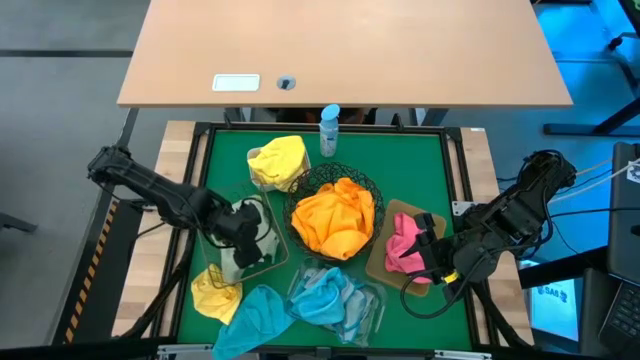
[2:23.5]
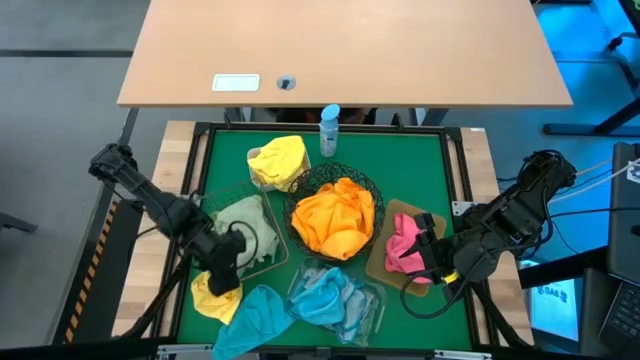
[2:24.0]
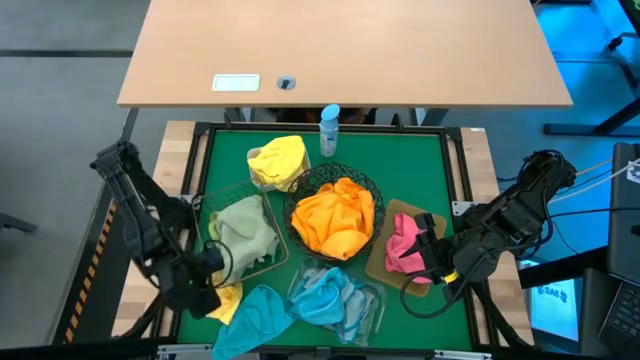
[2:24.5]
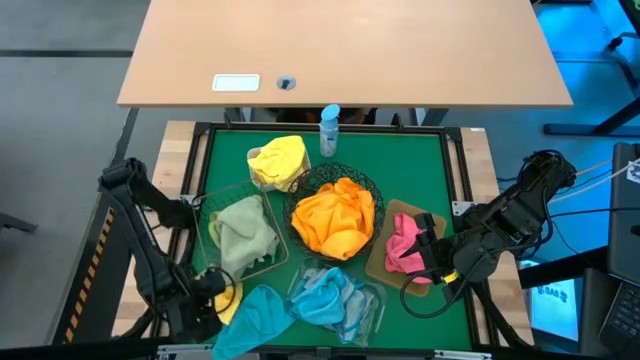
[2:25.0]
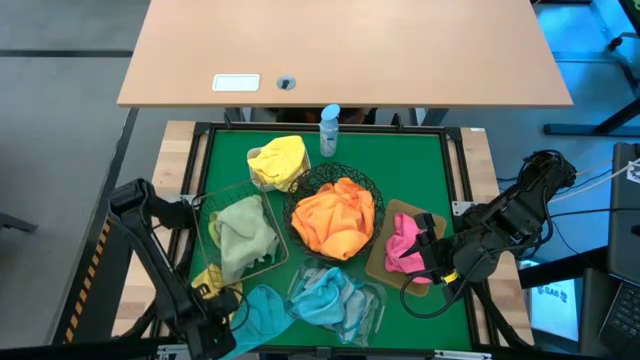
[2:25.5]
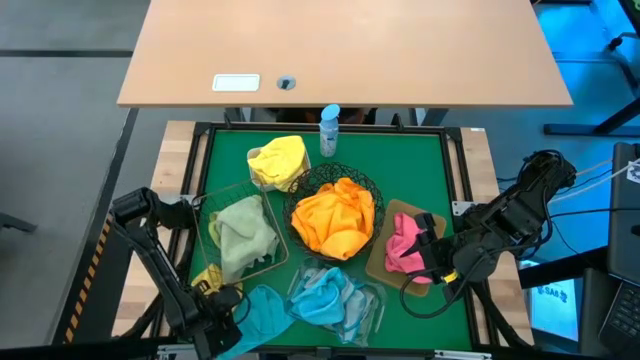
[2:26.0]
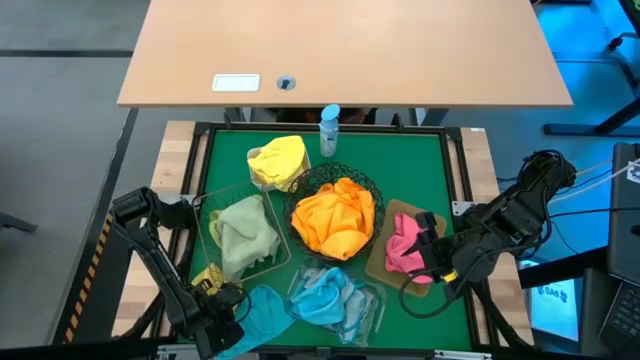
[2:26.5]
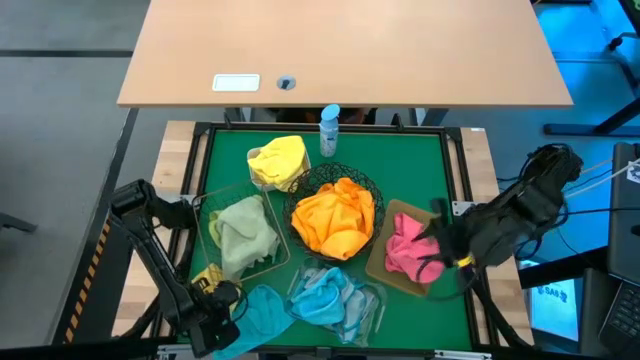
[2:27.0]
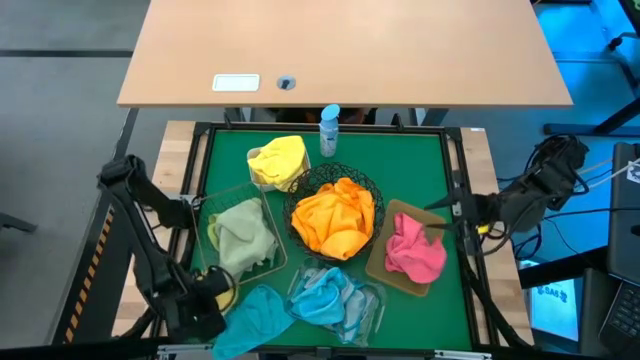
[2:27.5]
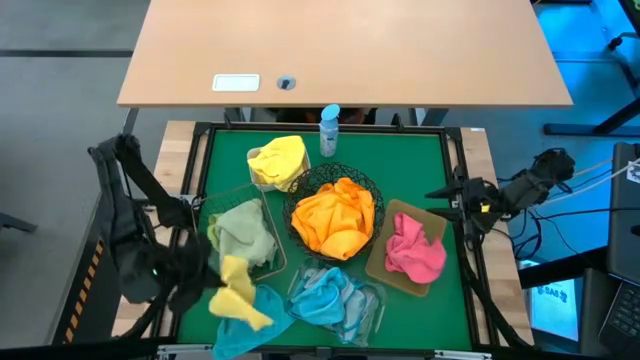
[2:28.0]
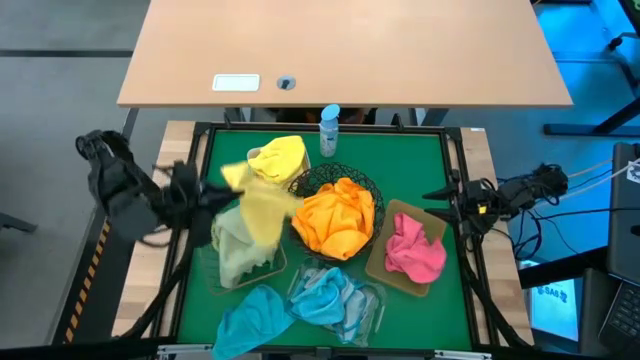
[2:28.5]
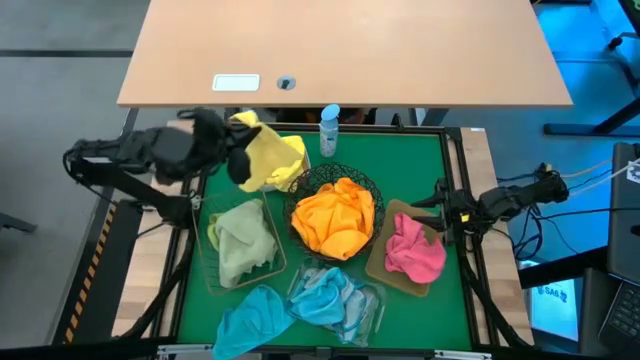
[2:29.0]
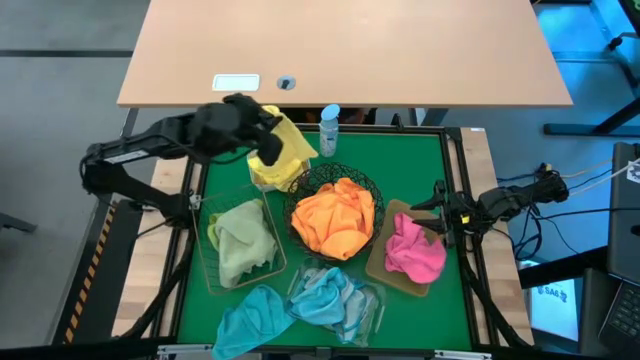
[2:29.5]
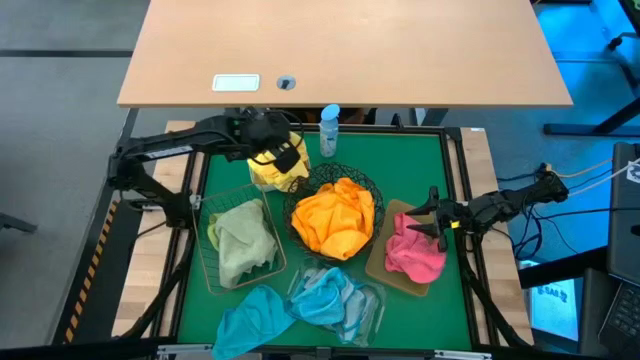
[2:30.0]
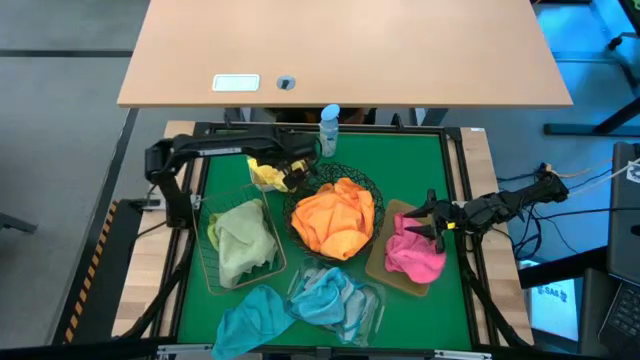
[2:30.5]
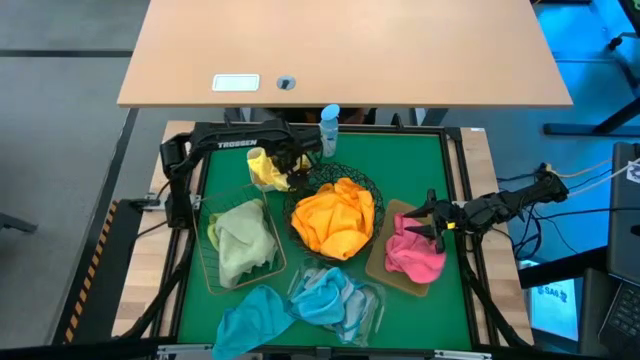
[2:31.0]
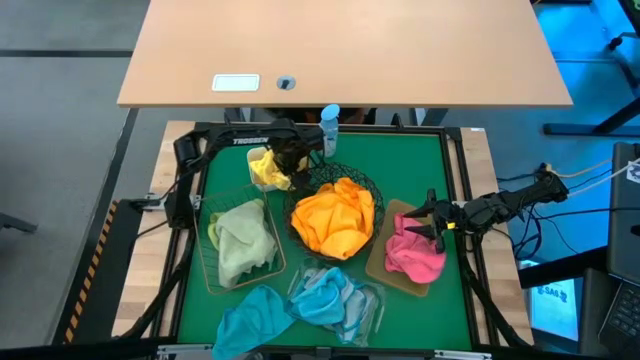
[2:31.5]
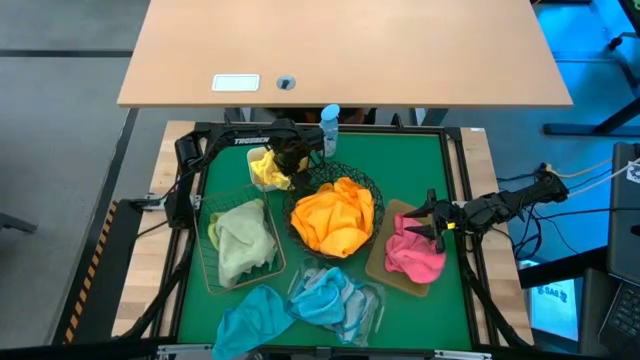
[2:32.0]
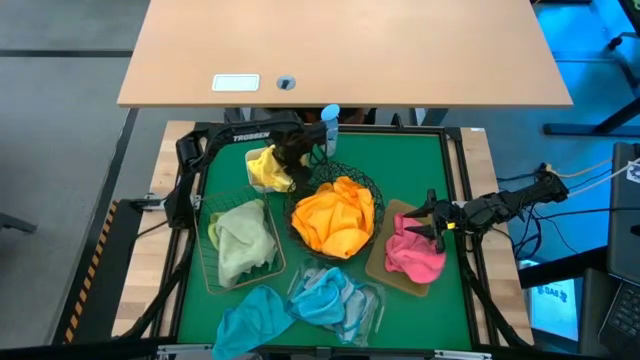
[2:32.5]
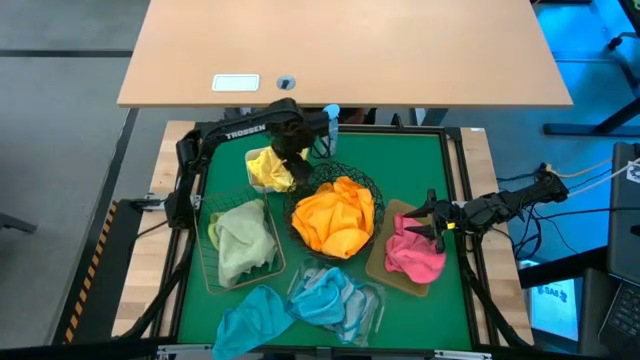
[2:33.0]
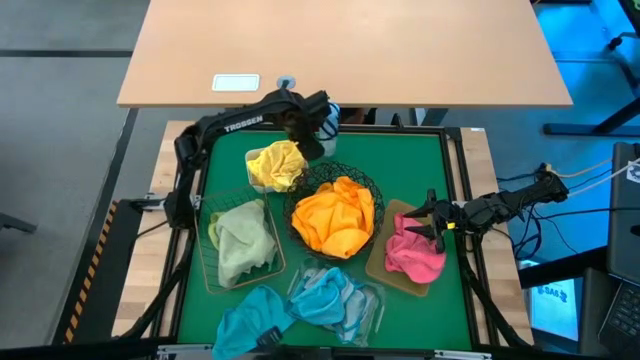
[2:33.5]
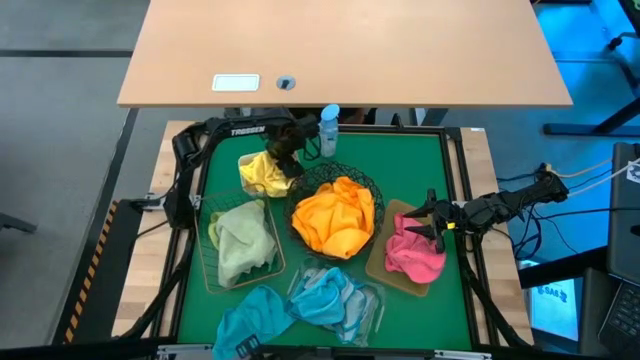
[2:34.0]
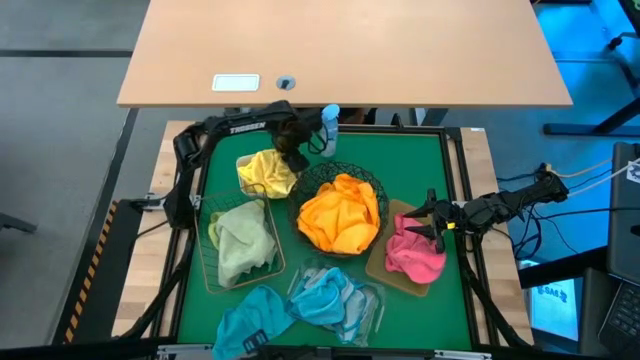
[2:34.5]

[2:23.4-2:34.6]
Task: Sort microfiber towel by color & place in baskets
Put the yellow towel into the white bin

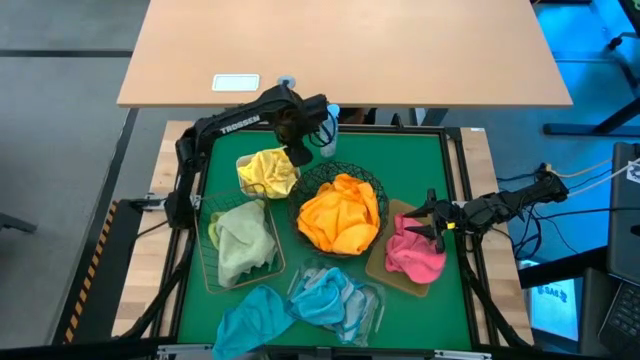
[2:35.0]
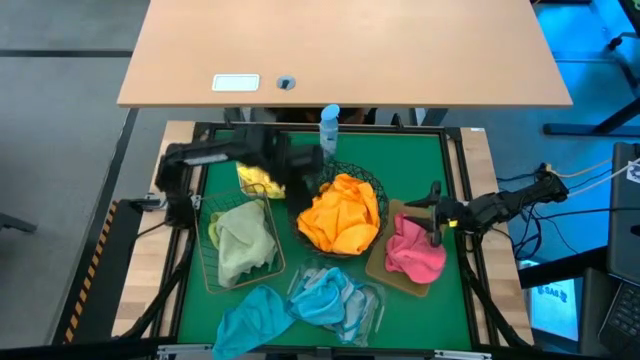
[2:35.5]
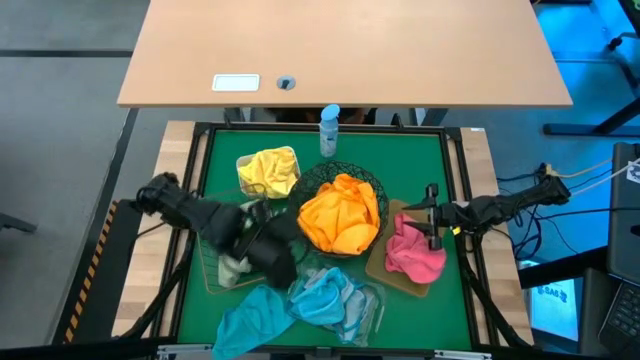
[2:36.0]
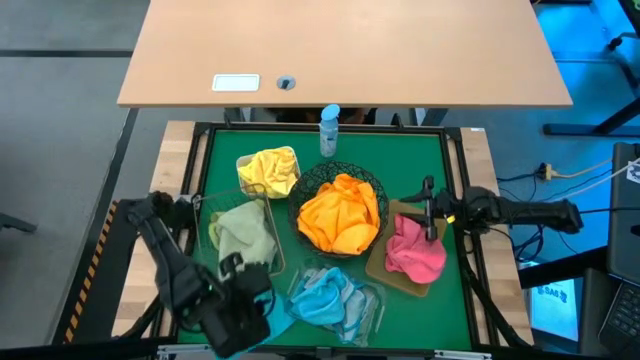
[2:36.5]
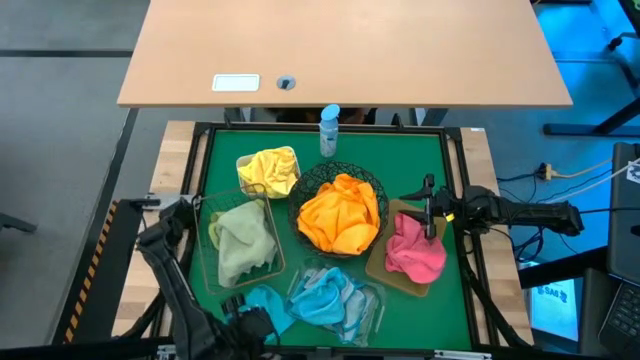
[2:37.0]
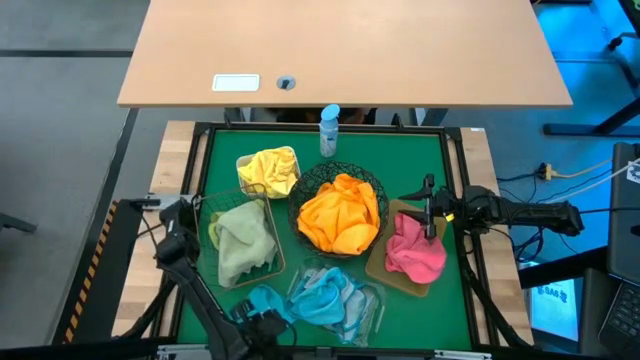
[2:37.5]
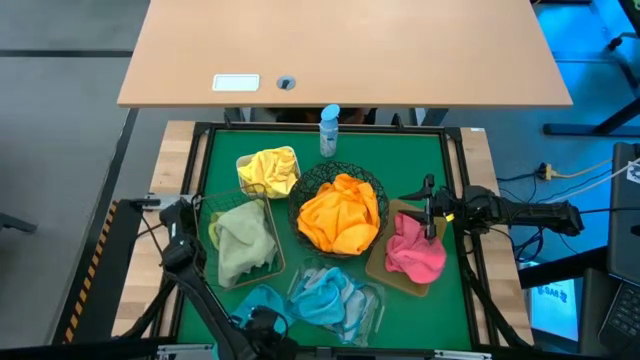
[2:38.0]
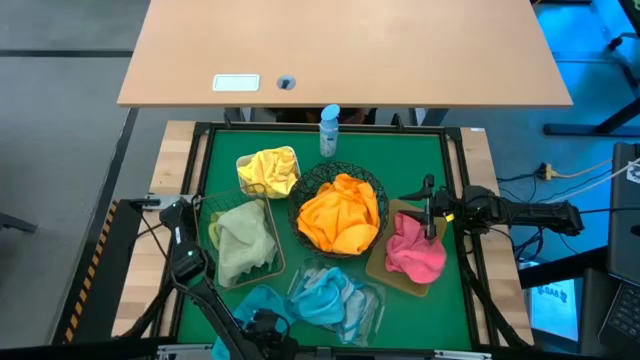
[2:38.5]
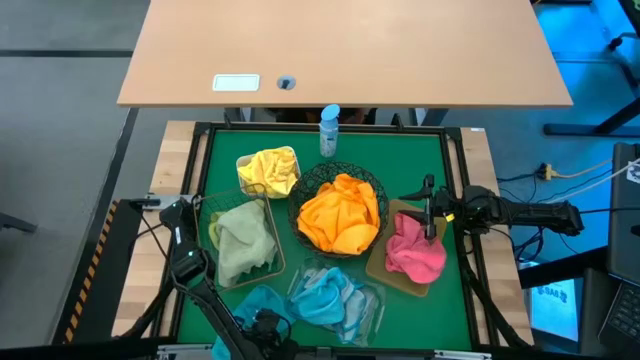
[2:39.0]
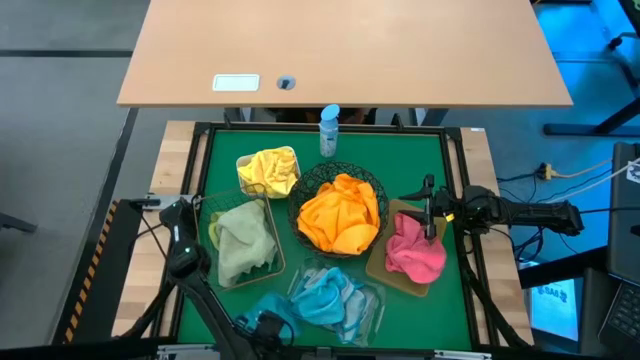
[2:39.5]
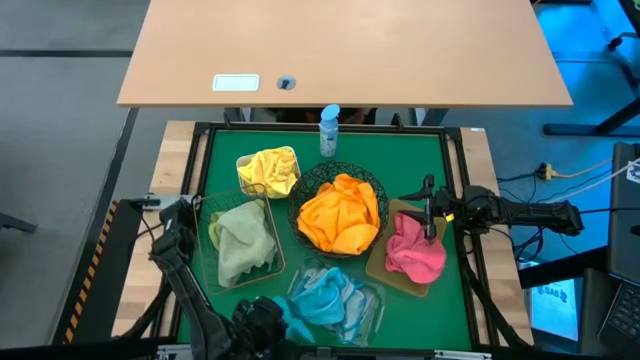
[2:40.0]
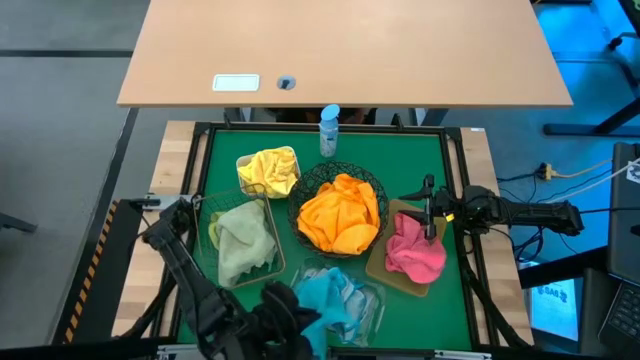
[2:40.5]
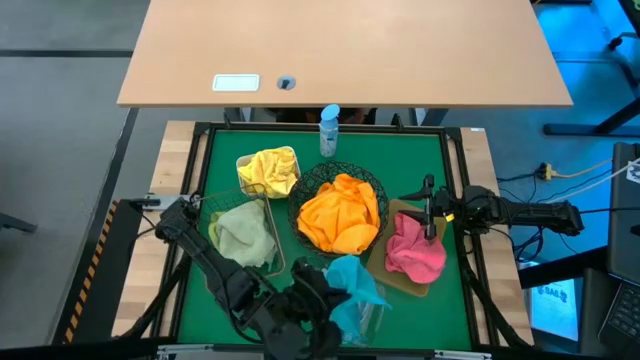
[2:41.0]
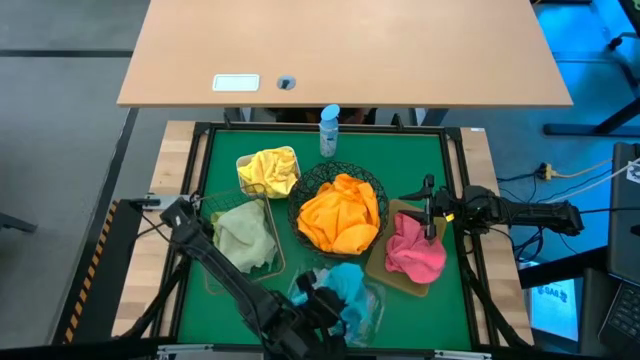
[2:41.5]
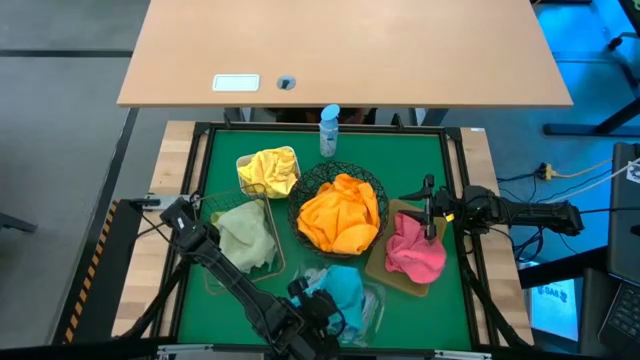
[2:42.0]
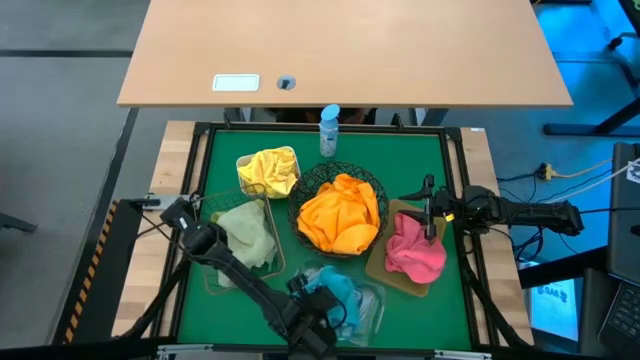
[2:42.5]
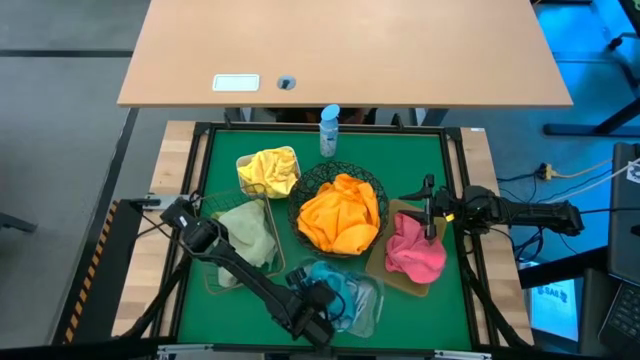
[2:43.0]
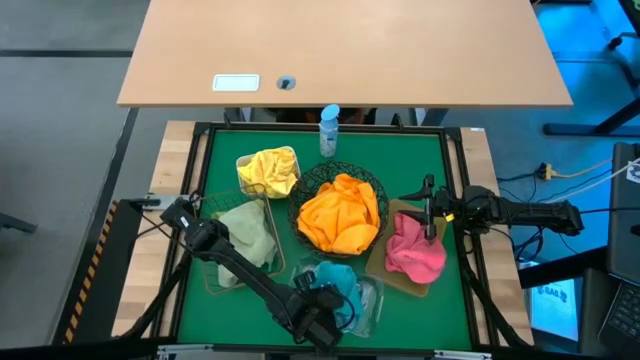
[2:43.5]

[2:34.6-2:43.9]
Put the blue towel into the transparent bin
